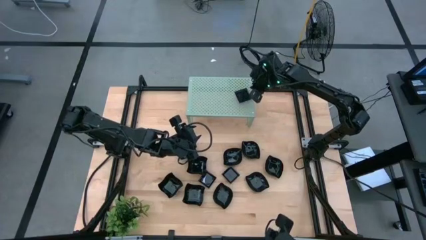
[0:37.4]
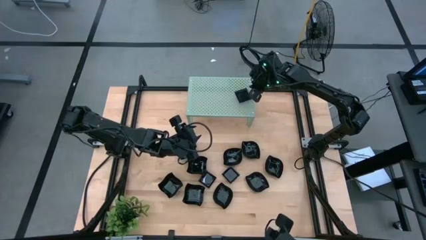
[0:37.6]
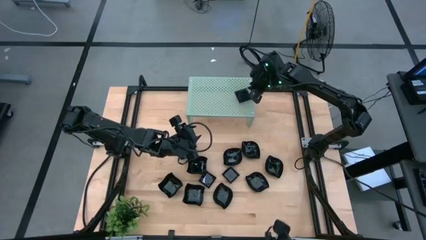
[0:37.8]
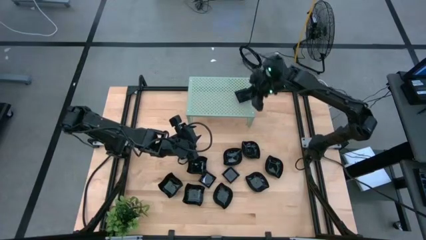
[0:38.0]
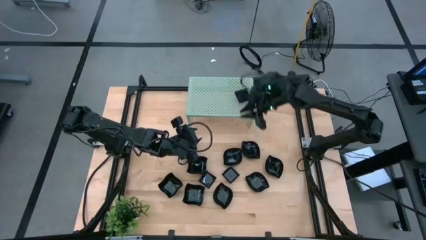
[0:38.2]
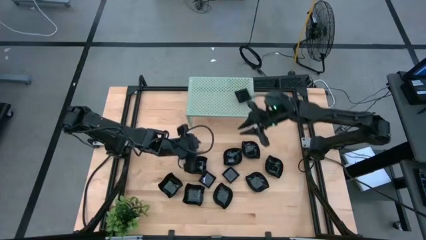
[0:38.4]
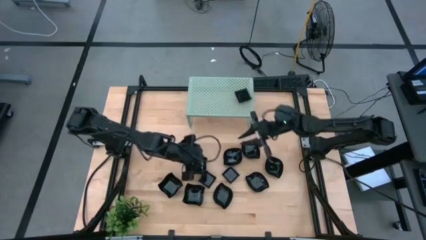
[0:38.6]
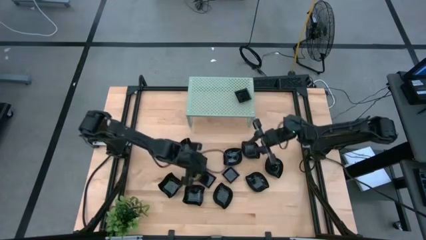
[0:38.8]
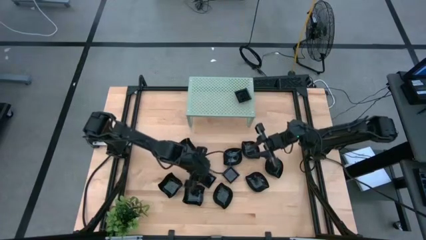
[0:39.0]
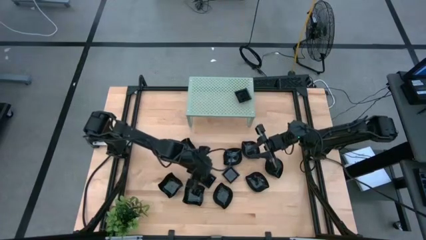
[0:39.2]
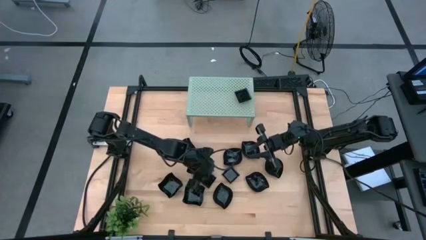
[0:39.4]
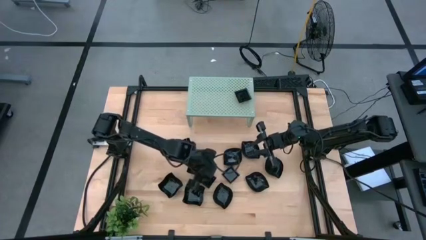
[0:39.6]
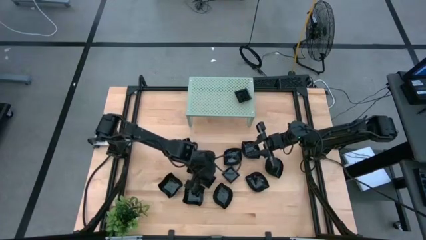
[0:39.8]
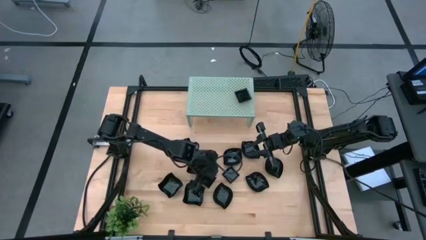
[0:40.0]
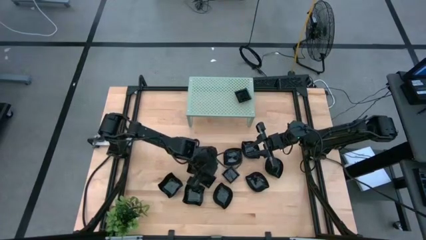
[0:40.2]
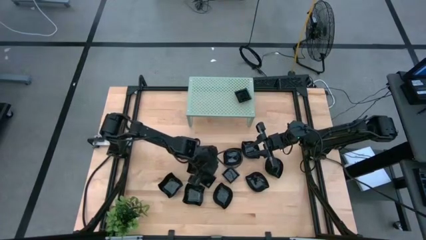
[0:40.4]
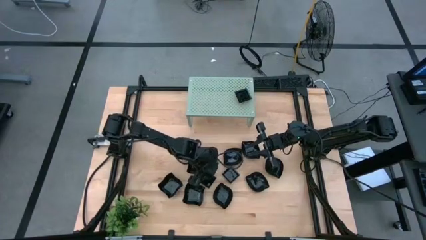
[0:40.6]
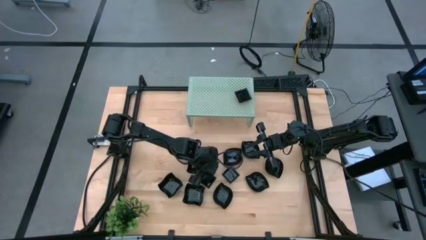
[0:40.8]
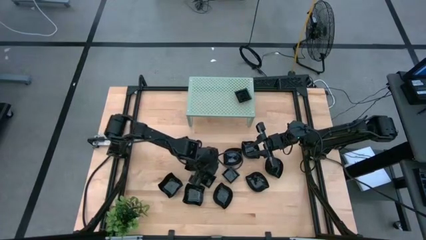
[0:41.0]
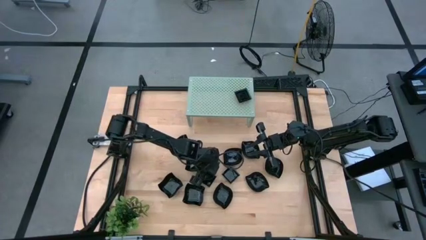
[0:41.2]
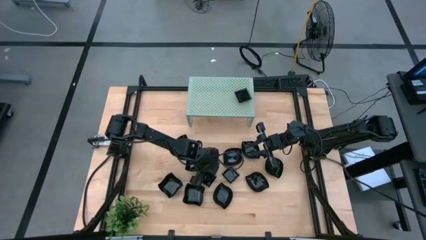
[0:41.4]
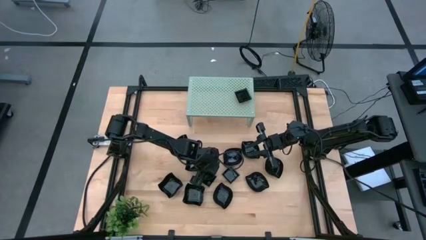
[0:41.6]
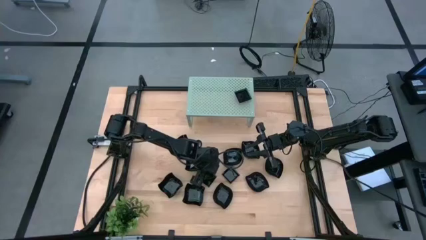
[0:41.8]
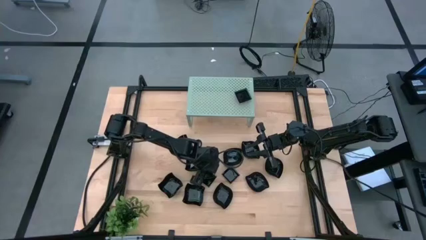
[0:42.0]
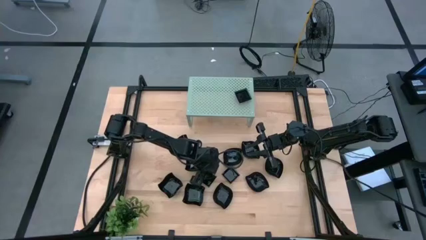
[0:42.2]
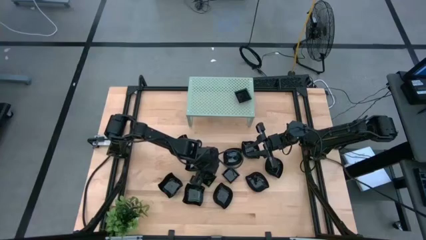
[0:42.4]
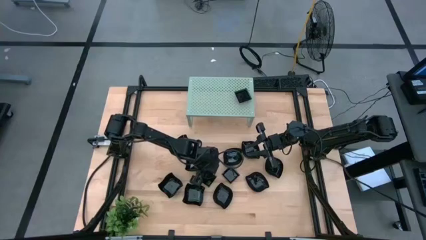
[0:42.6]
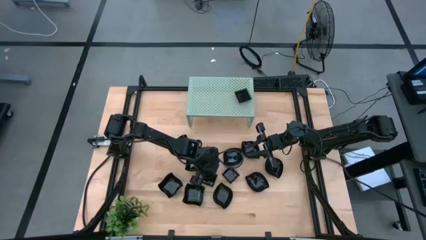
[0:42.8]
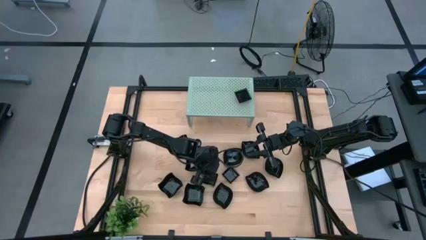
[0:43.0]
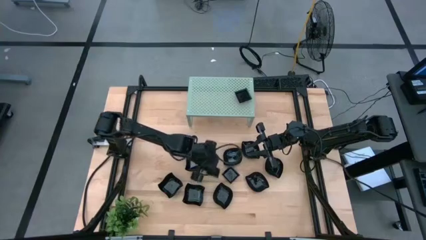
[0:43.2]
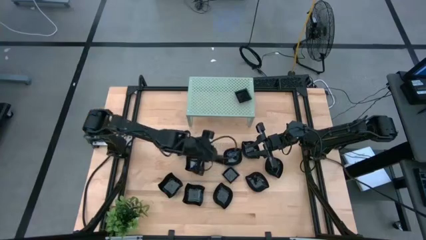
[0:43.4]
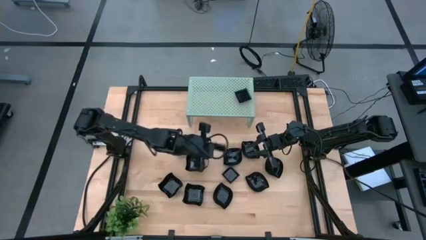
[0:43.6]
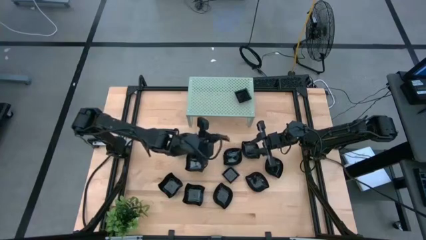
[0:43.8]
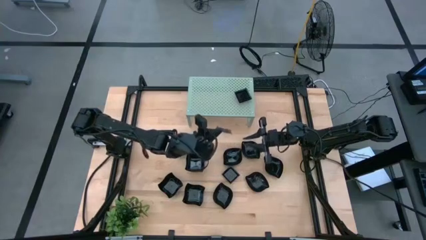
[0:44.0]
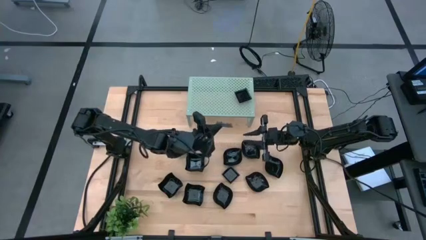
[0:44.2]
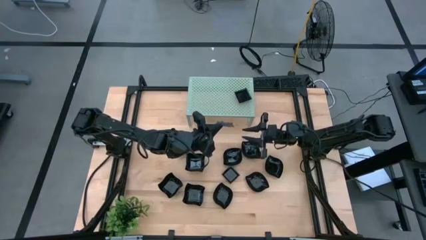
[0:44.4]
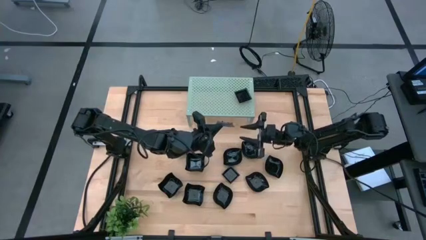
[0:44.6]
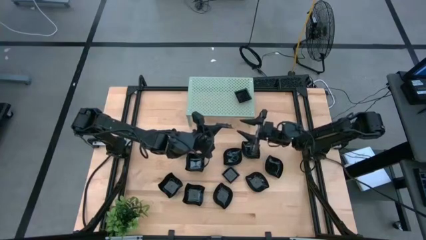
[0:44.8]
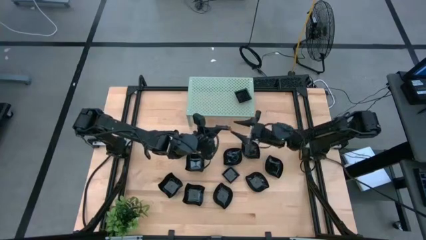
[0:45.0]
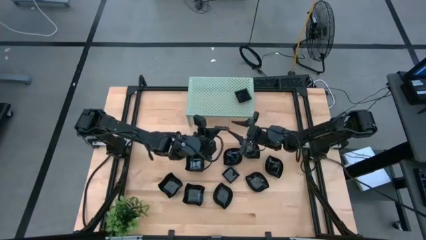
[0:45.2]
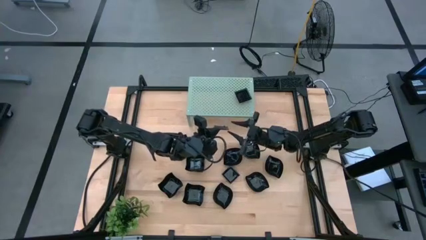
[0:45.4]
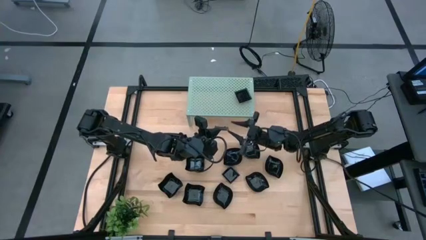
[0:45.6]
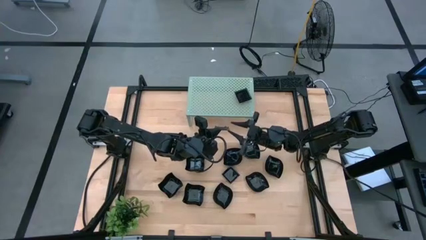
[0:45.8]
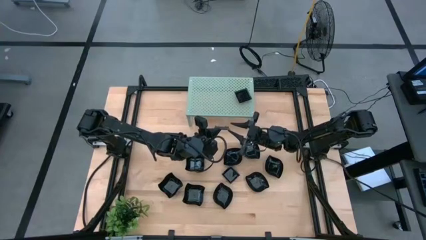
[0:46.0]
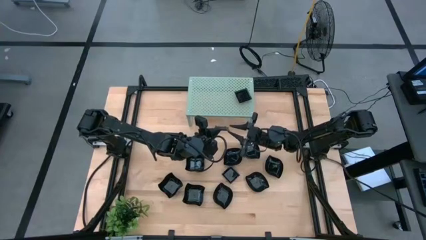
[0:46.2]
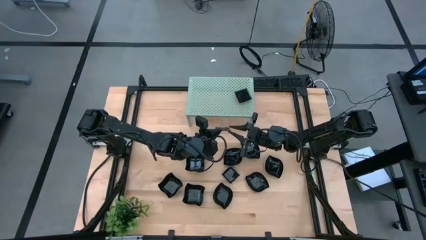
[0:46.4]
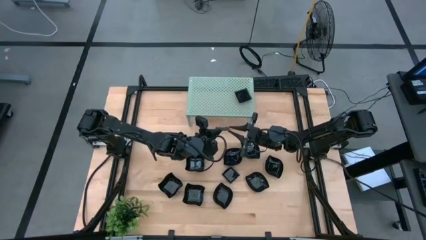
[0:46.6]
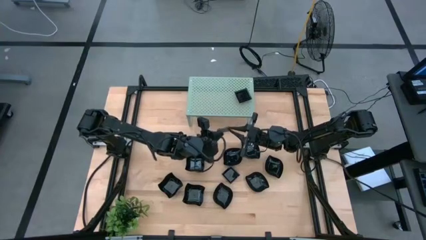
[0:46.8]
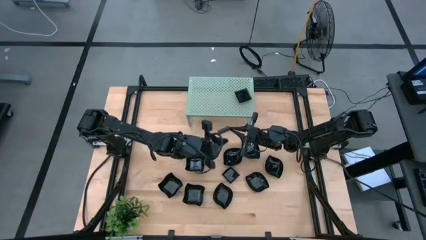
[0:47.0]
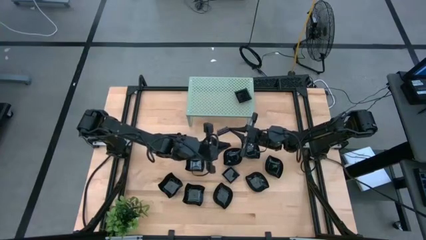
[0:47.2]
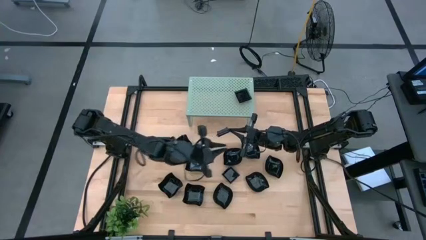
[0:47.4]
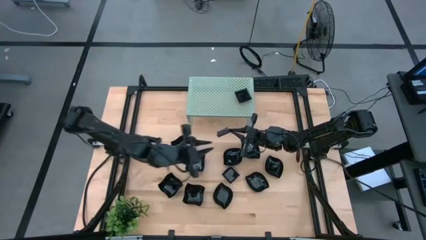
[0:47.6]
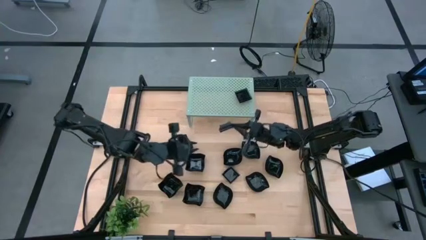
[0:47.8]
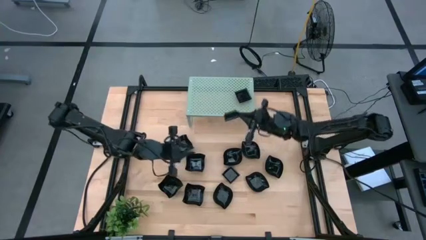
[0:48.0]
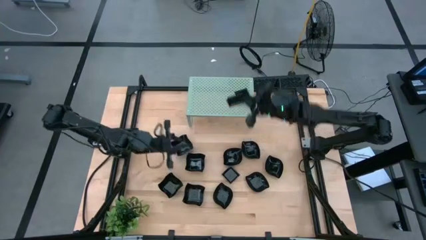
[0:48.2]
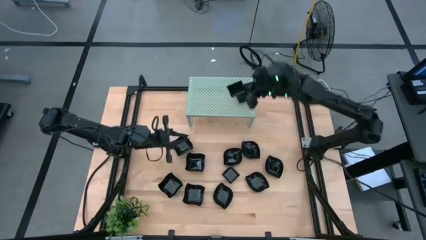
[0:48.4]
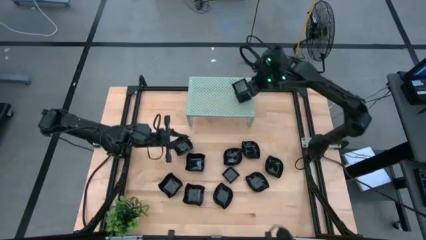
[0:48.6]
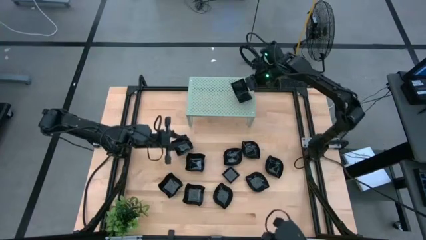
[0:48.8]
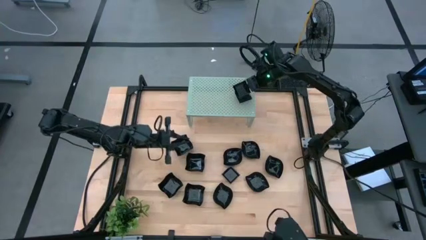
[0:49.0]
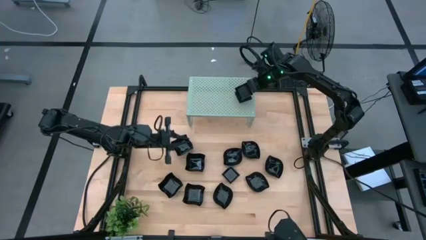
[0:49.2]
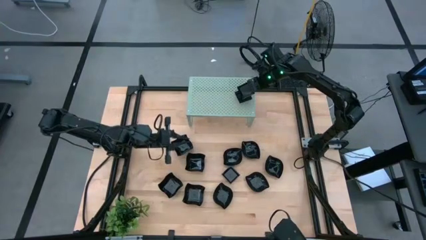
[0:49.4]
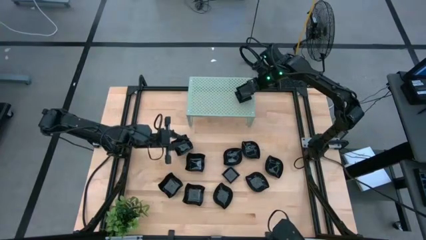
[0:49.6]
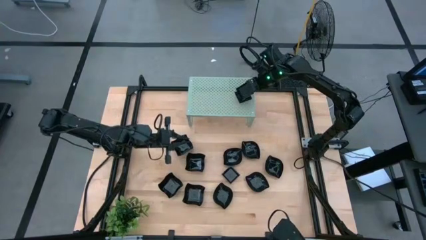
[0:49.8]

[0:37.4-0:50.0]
Task: Pick & Place Mini shaped plates
Stack the black square plate on top of the other black square plates on the shelf
